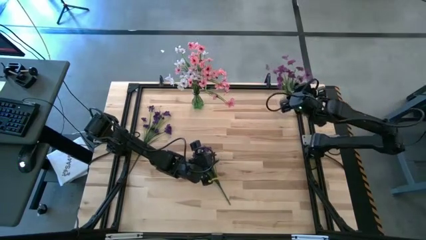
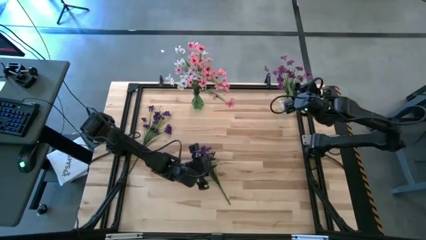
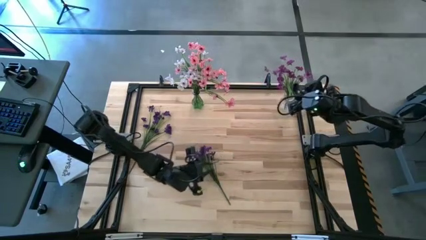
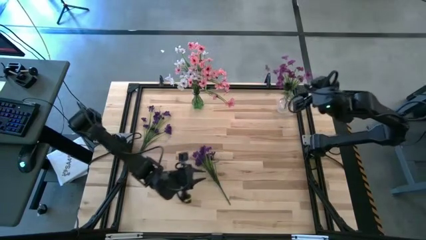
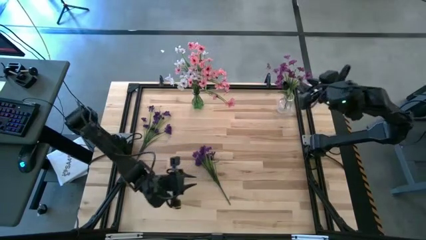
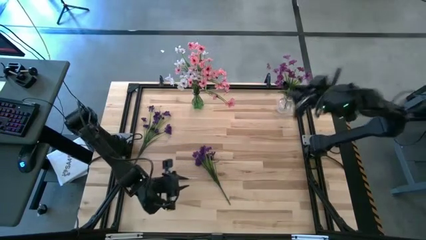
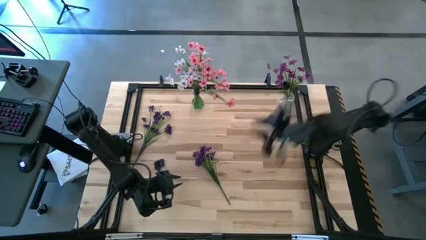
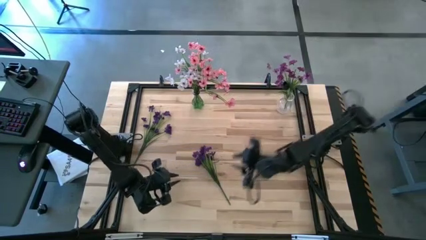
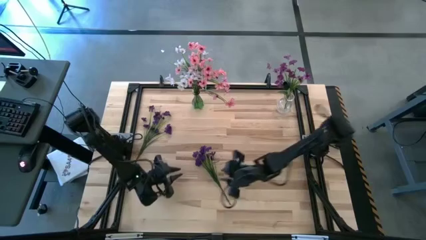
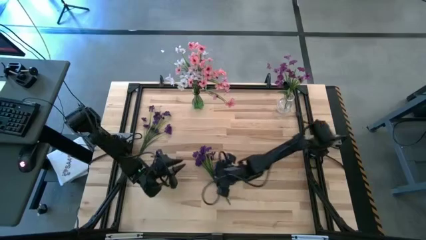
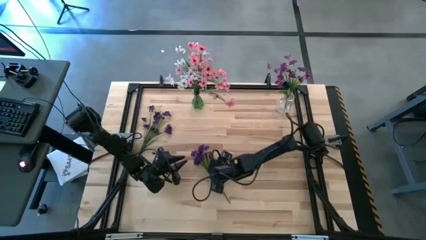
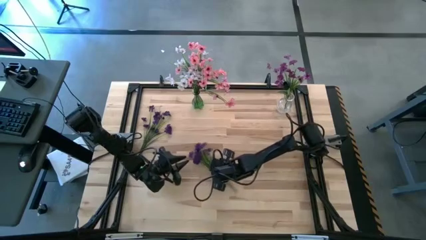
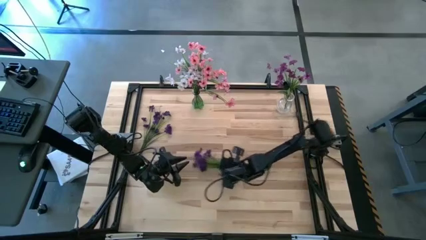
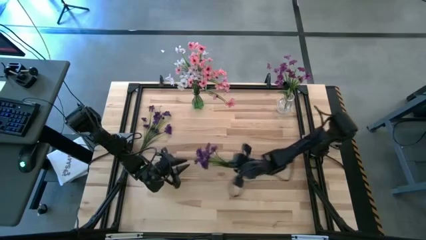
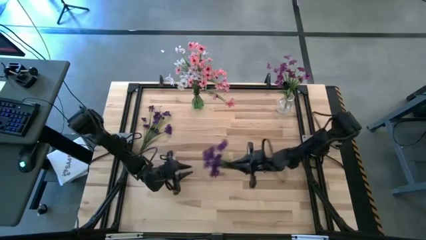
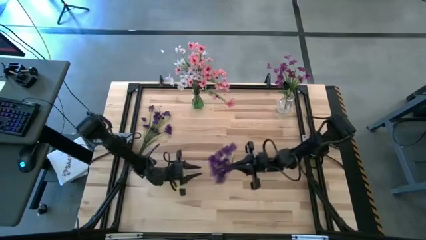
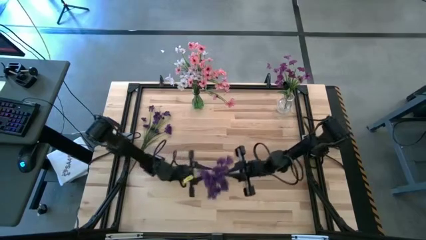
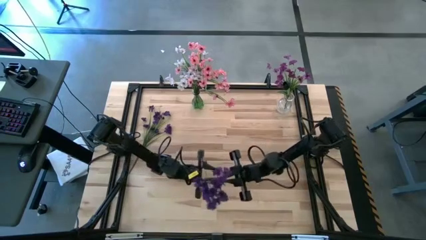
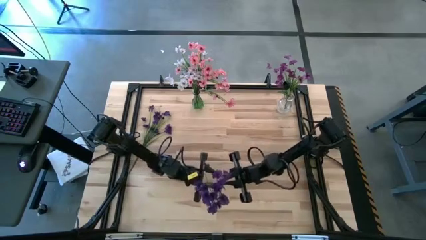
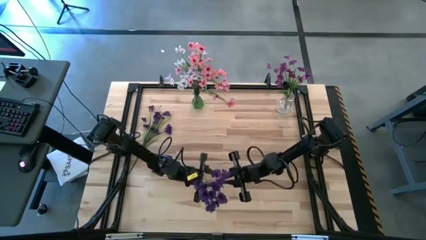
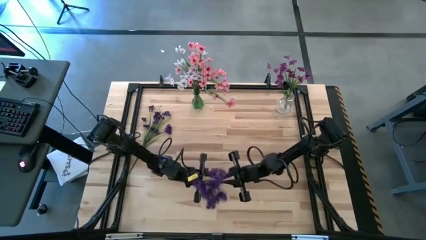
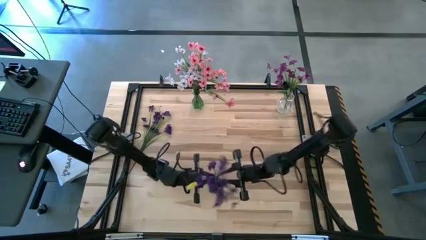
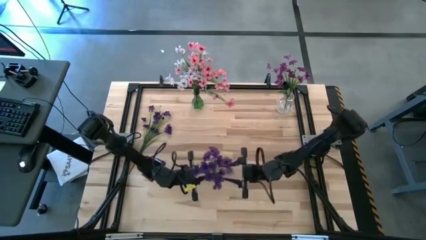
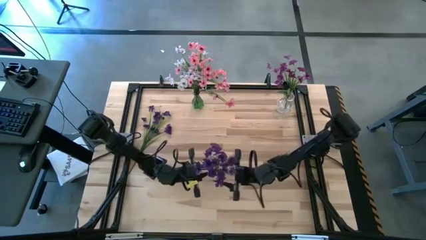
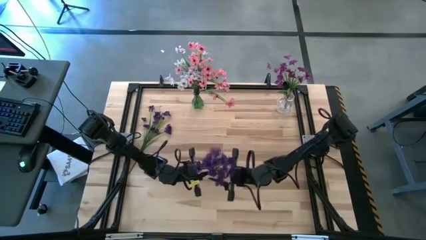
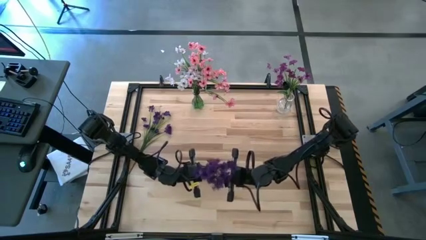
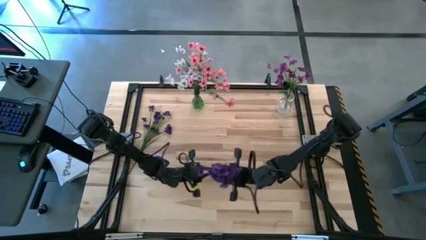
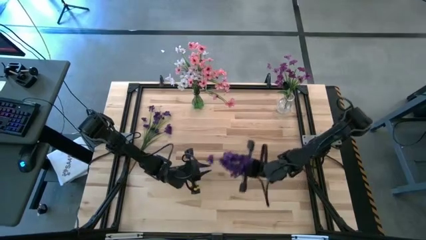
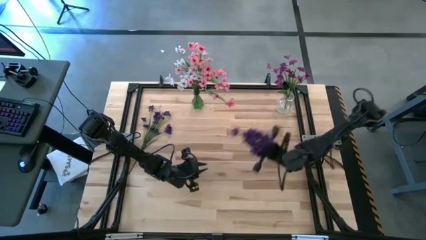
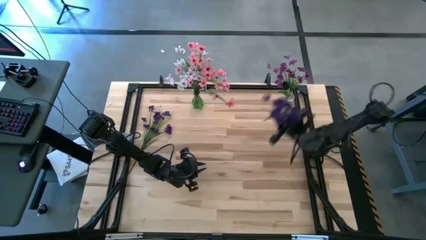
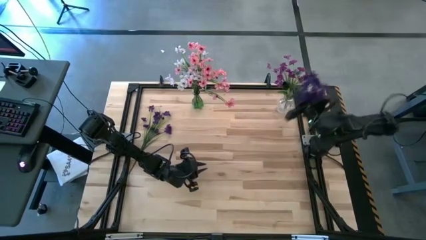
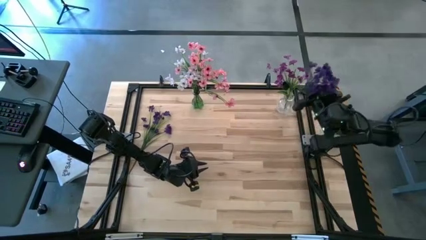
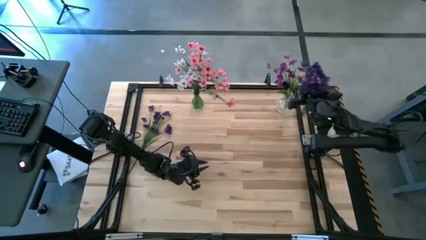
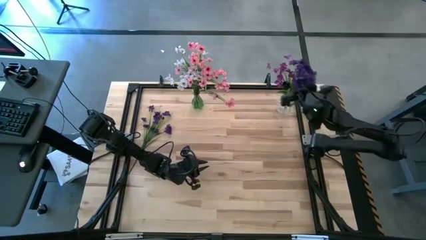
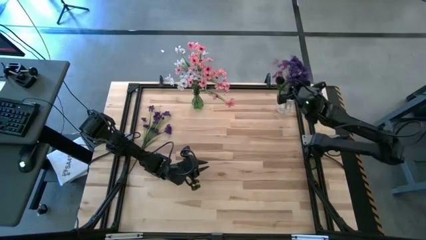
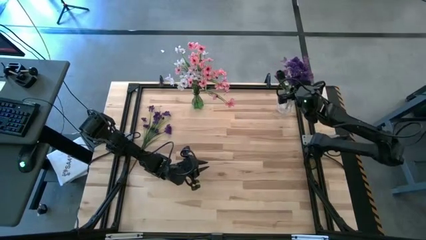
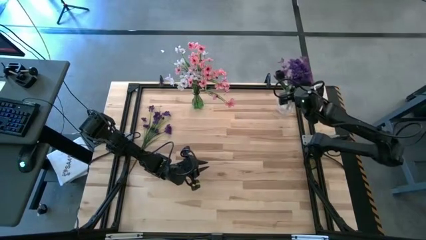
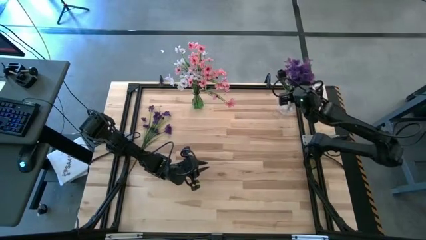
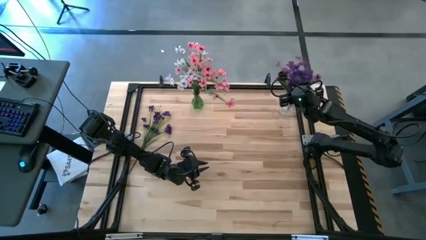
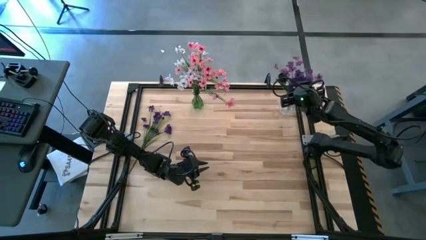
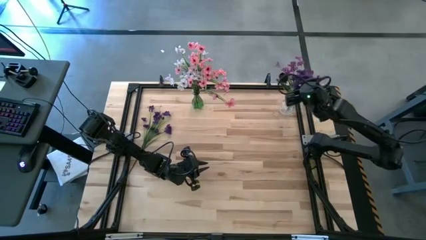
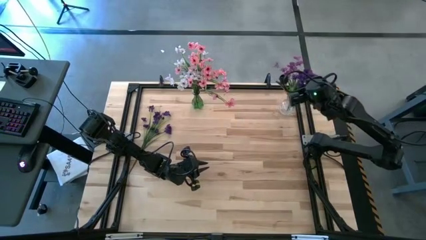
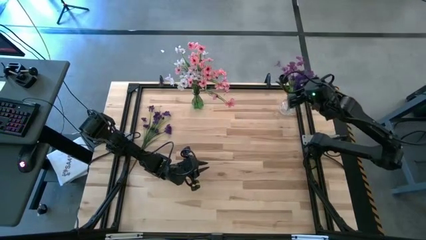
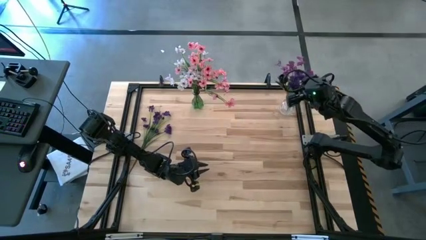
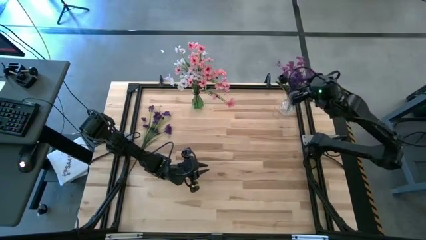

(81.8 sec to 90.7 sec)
Task: Sort flowers into vase by color
Put the middle purple flowers into the transparent vase

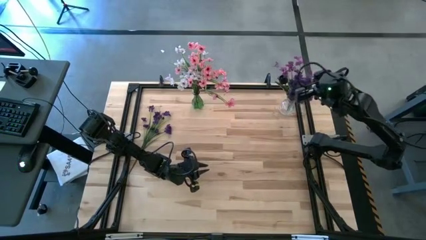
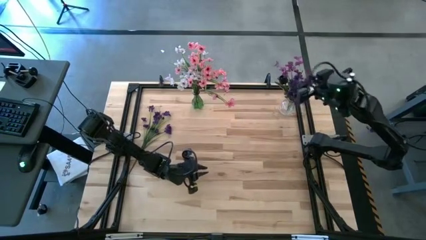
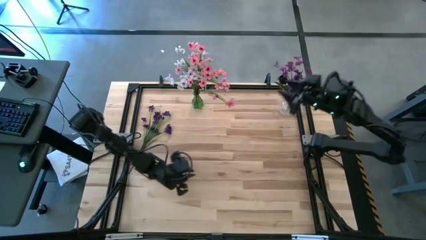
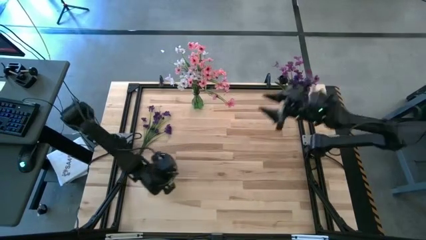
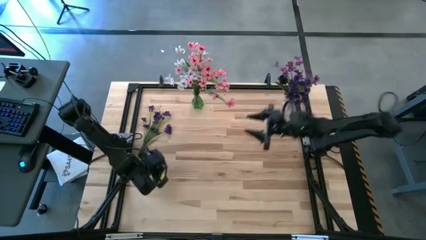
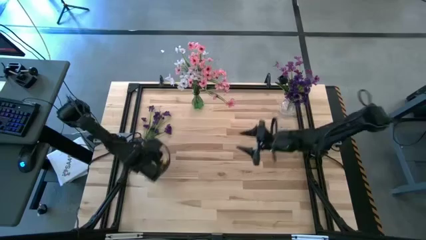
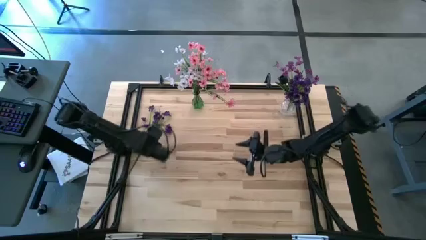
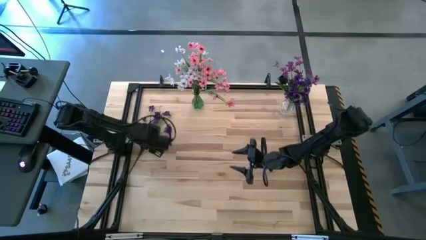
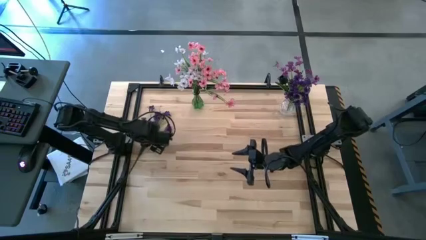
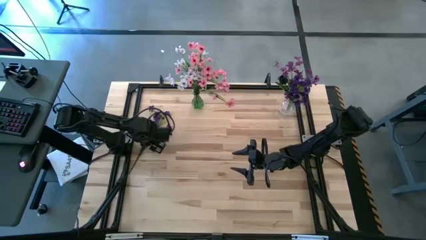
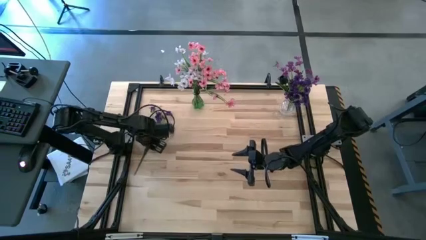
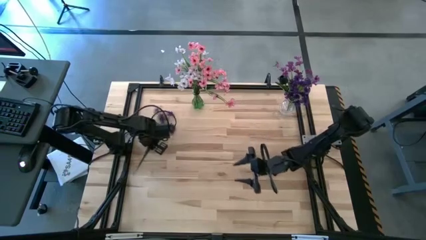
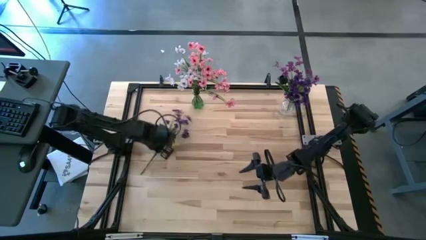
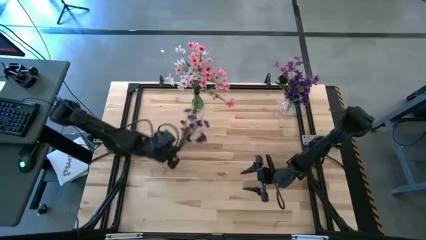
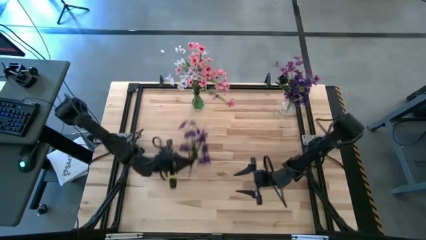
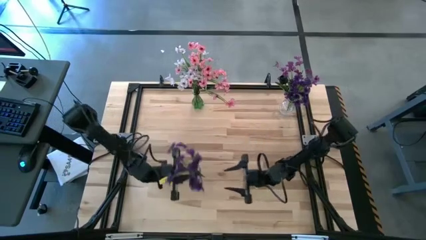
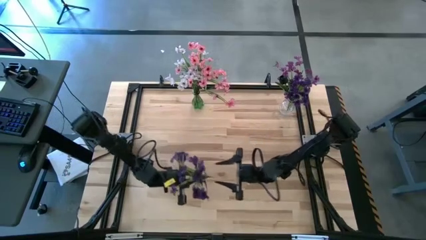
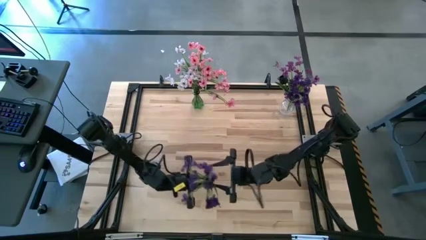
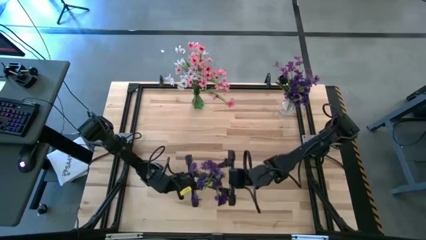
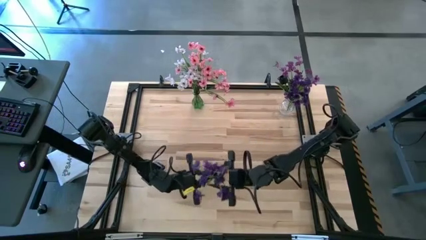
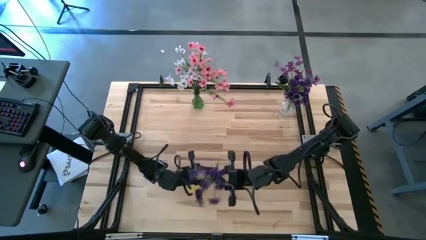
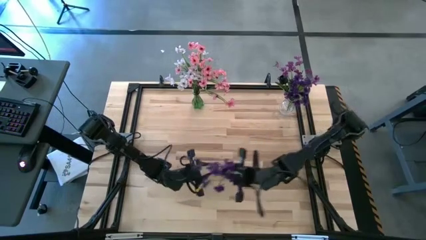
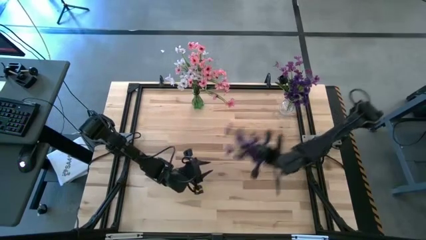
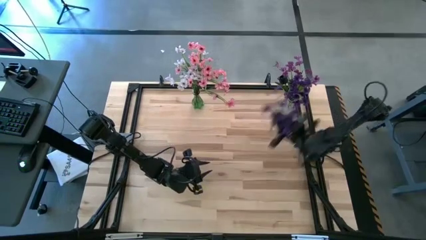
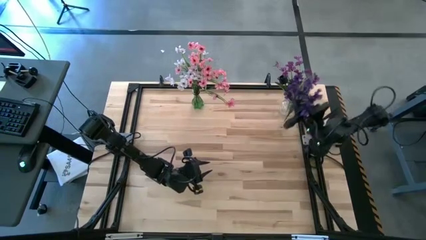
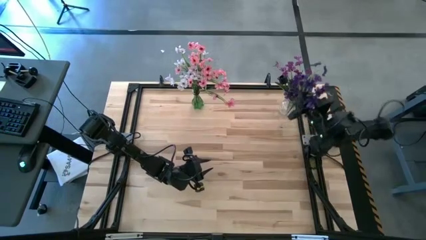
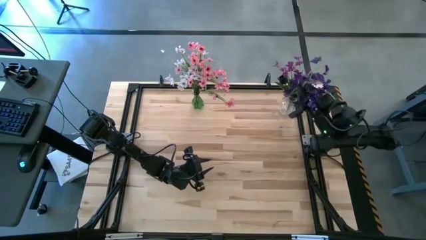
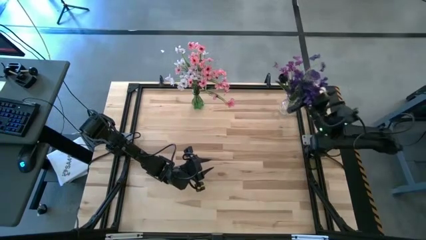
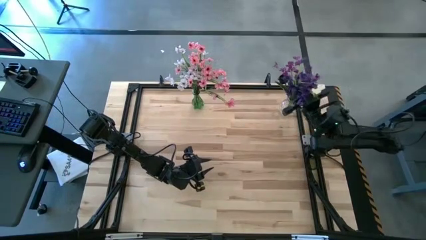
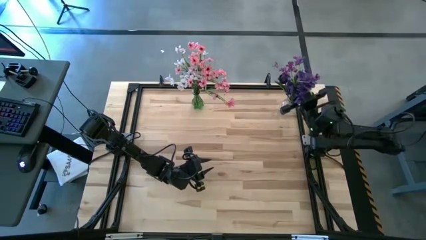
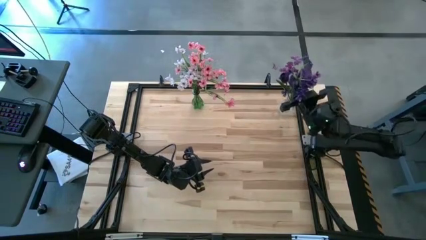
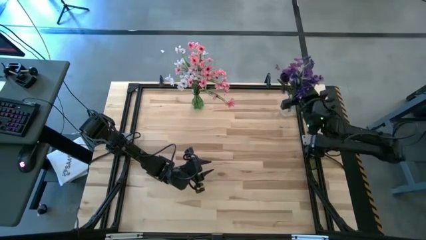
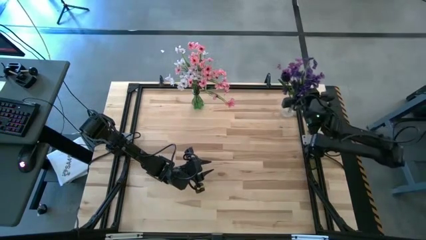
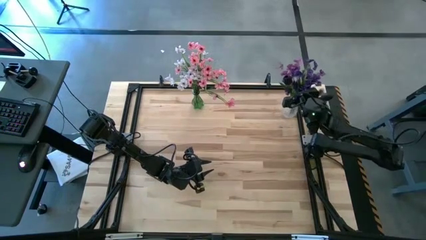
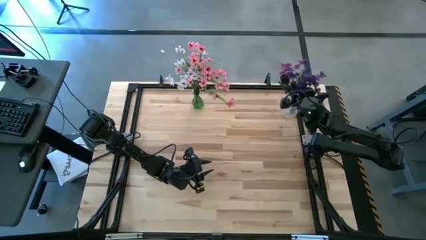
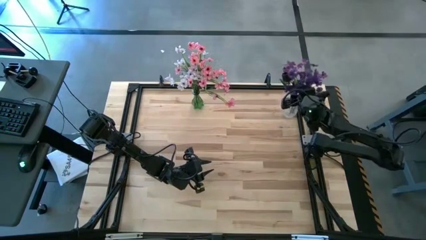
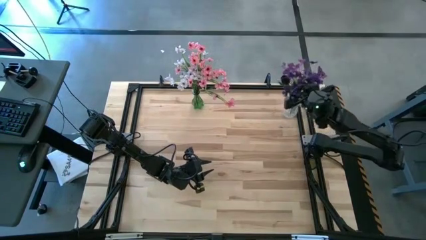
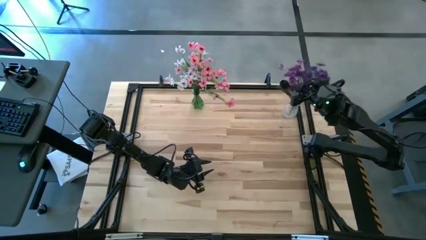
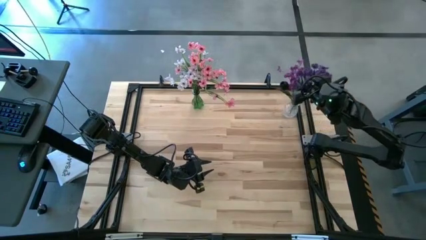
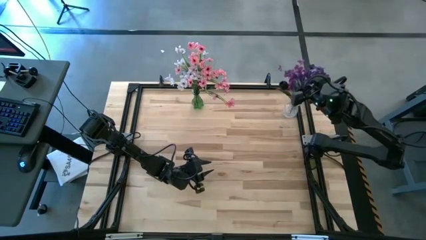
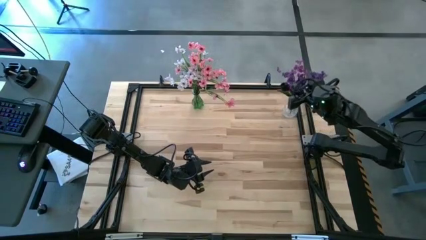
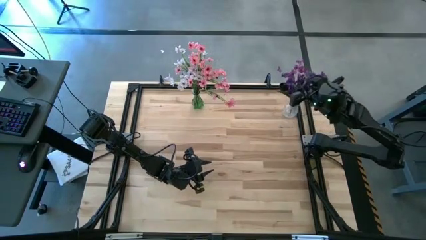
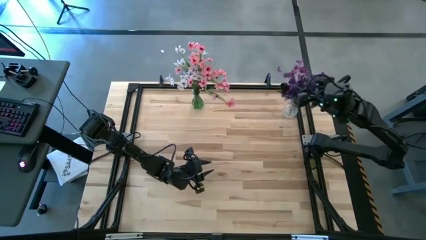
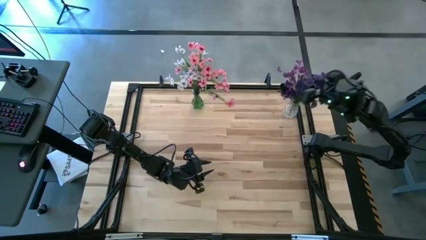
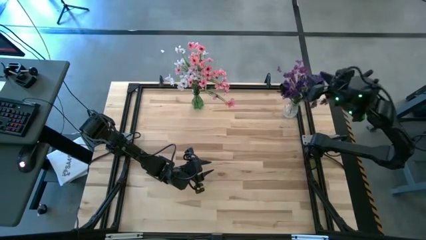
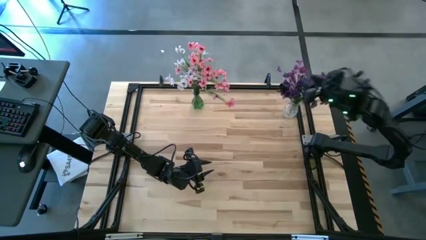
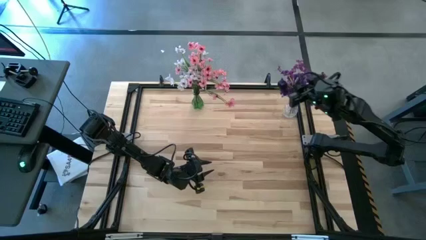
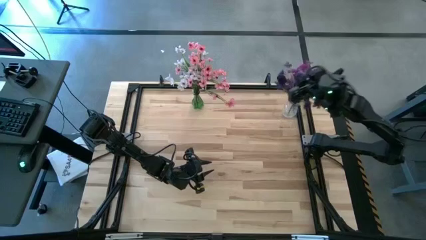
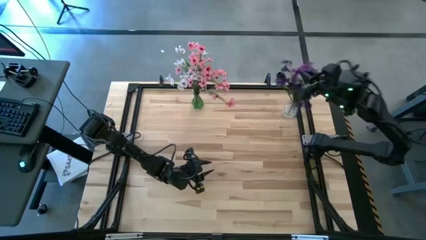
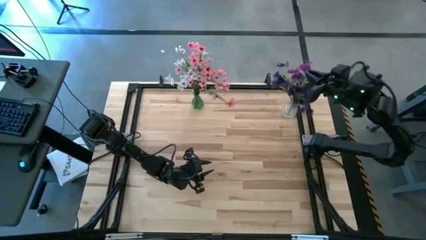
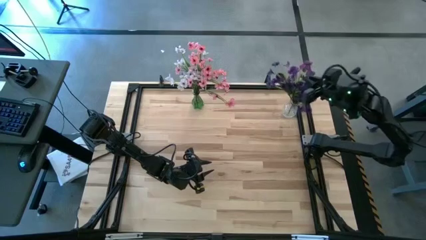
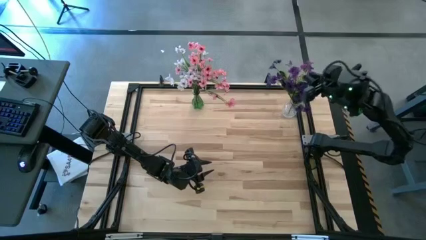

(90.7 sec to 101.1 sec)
Put the purple flowers into the transparent vase
